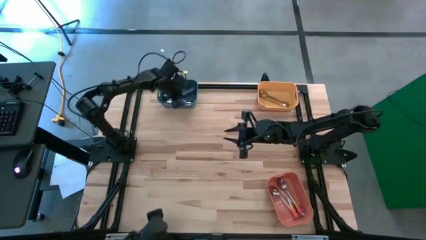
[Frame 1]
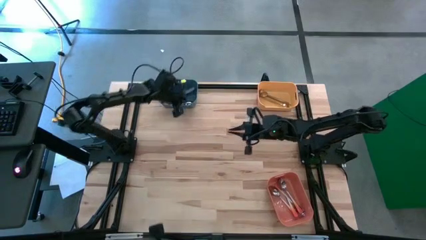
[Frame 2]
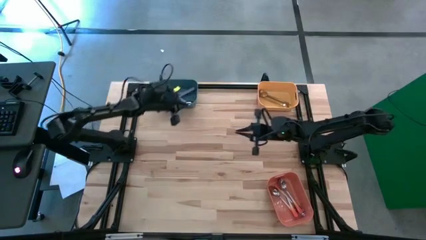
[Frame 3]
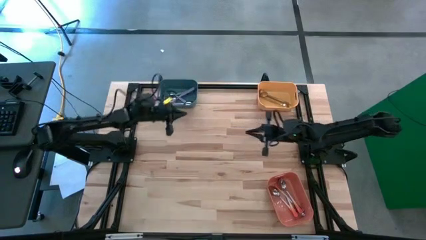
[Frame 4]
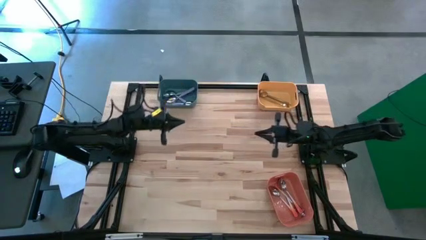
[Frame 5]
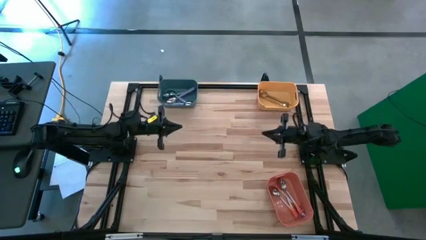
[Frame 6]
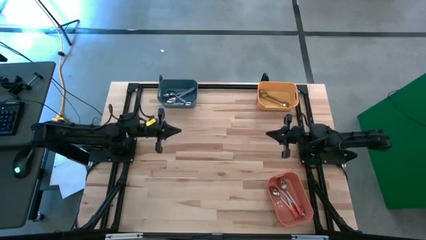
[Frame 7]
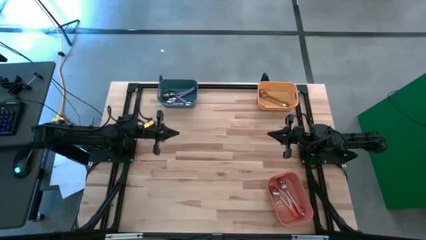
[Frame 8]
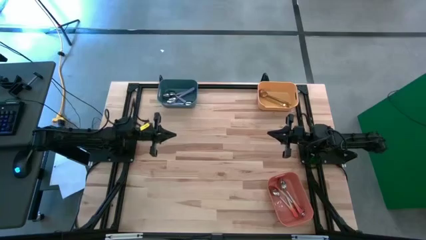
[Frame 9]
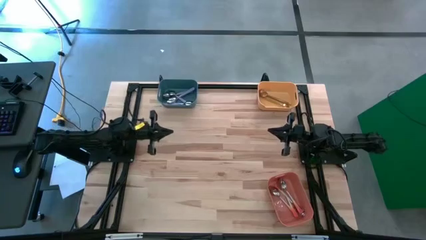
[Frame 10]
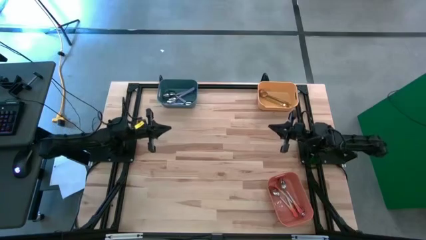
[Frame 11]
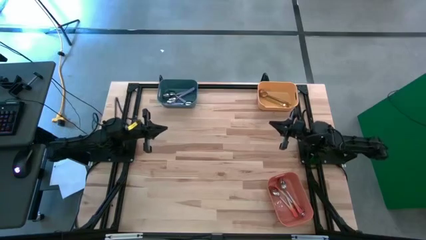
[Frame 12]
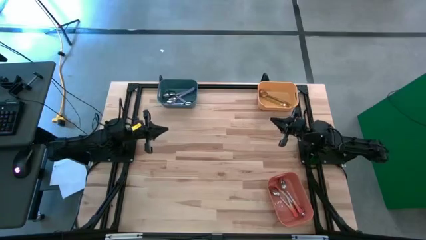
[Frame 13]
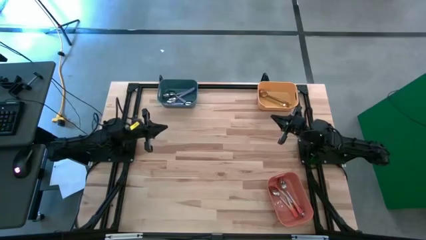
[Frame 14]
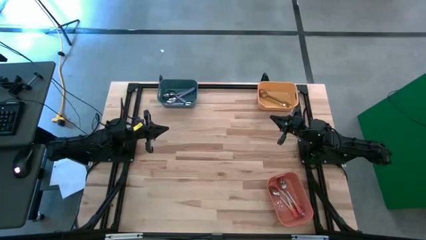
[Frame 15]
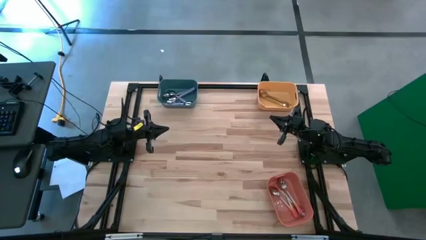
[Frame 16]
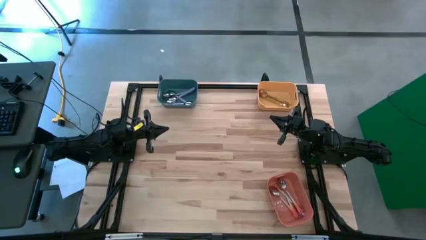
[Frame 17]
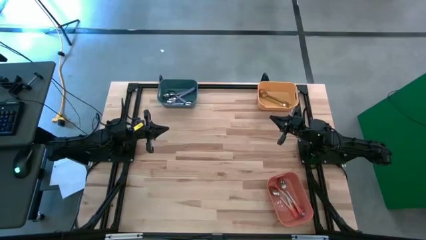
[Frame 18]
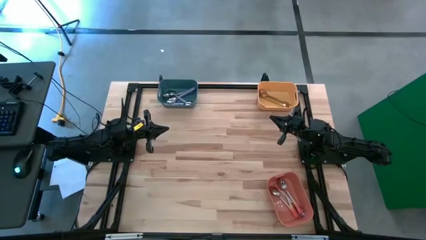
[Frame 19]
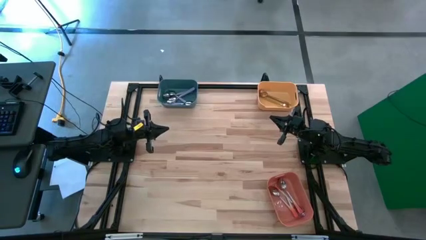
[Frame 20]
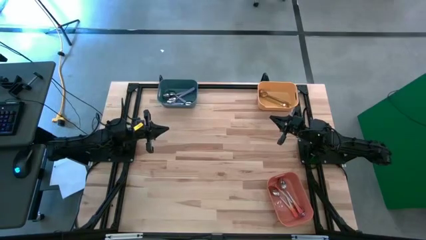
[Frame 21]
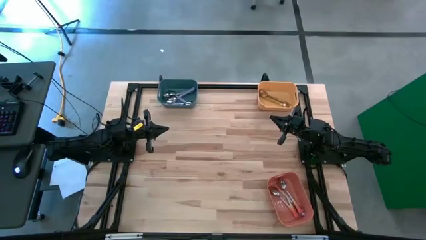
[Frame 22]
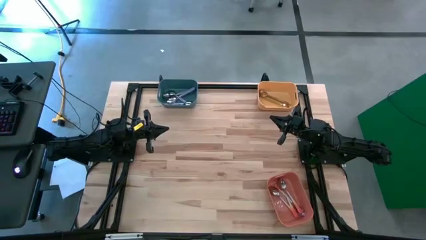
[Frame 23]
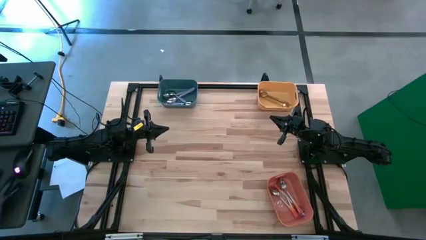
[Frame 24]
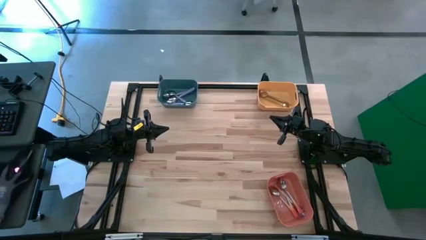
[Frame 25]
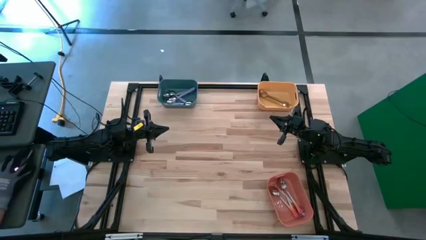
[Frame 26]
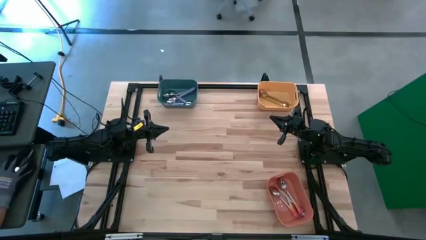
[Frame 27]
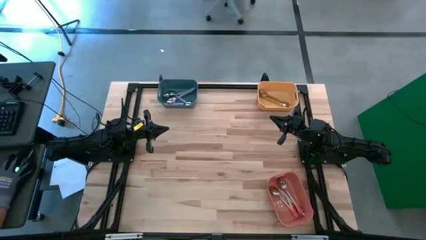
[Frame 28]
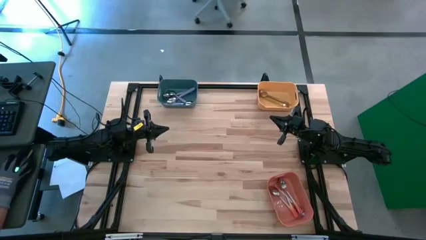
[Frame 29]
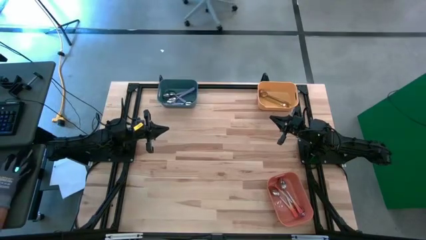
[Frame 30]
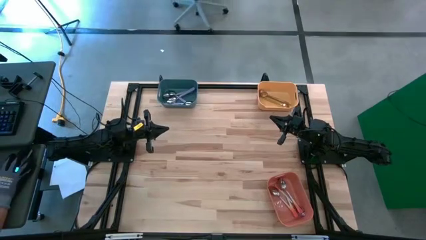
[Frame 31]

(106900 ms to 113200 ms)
Task: Sort silverware by color (type)
Return to Home Position

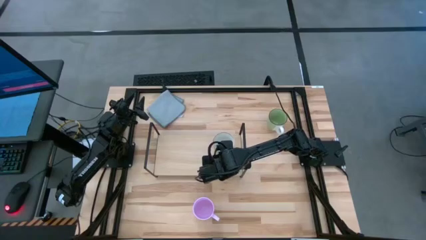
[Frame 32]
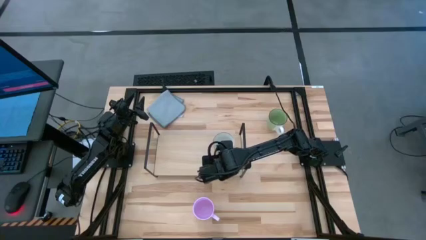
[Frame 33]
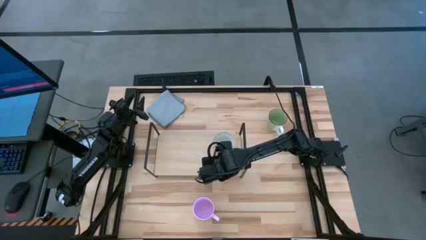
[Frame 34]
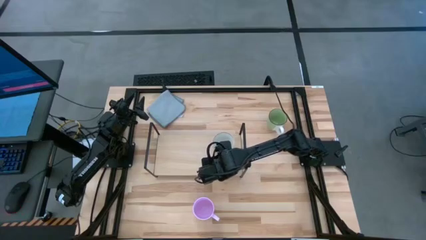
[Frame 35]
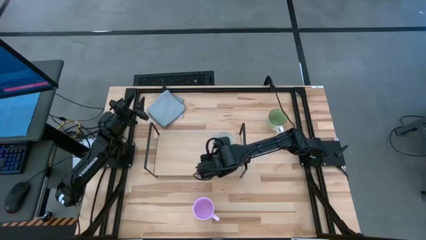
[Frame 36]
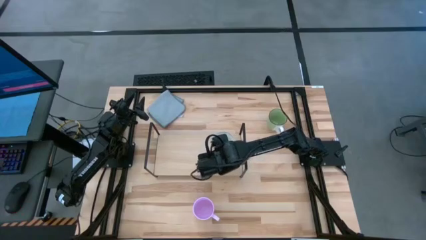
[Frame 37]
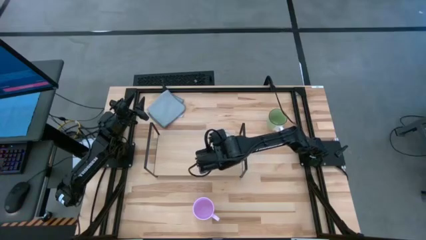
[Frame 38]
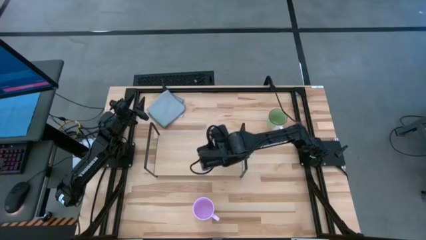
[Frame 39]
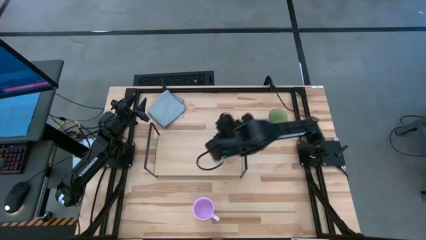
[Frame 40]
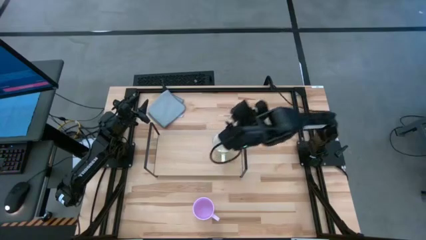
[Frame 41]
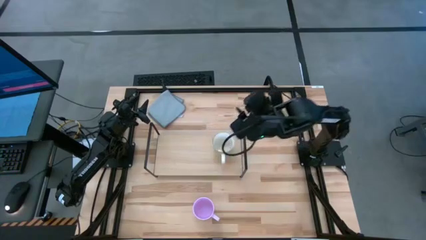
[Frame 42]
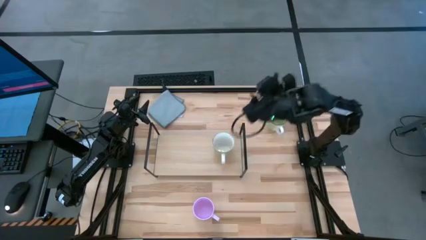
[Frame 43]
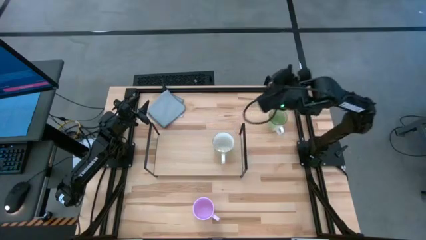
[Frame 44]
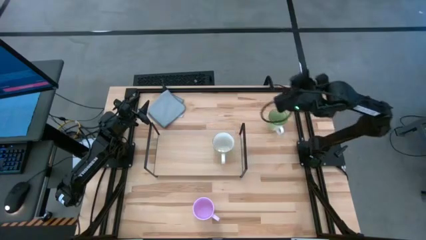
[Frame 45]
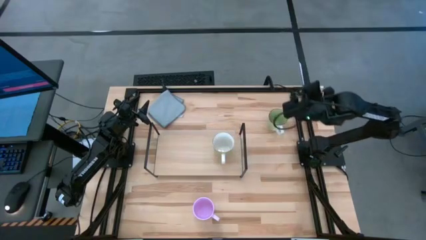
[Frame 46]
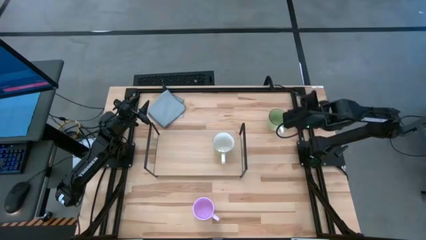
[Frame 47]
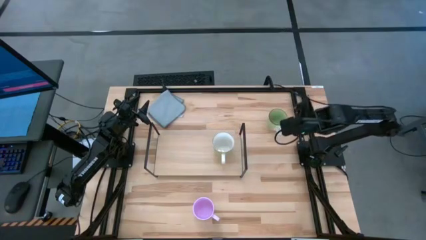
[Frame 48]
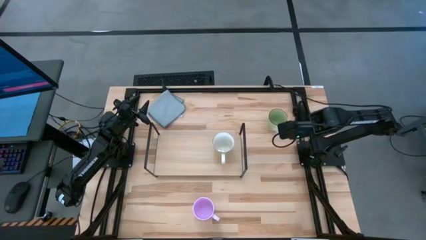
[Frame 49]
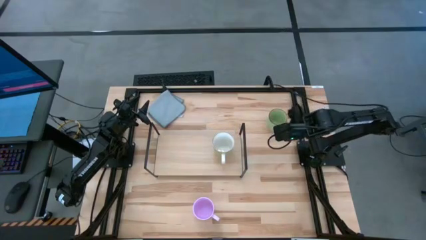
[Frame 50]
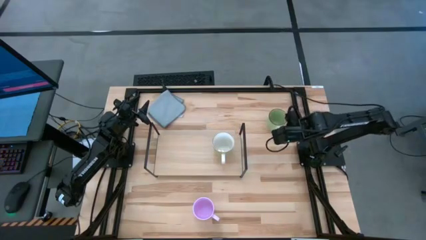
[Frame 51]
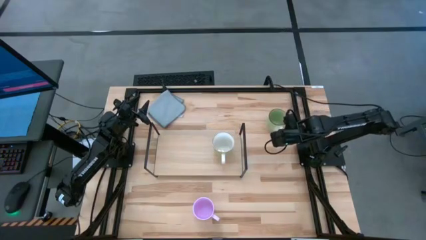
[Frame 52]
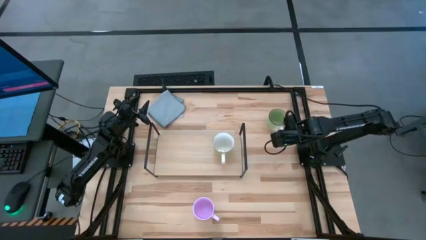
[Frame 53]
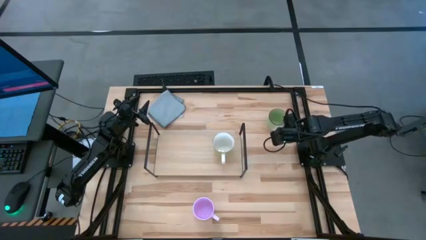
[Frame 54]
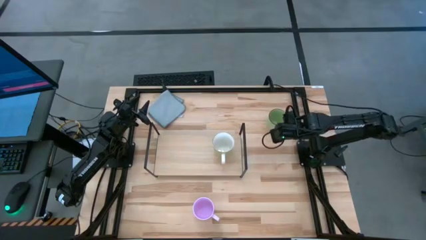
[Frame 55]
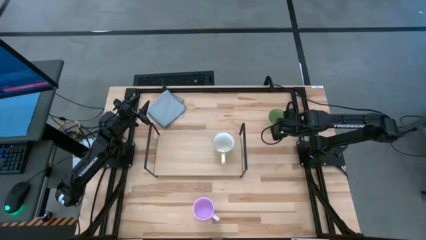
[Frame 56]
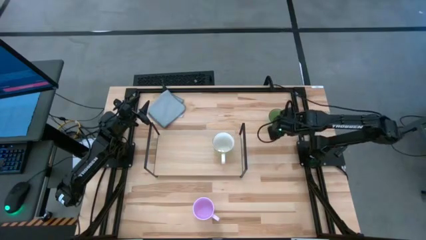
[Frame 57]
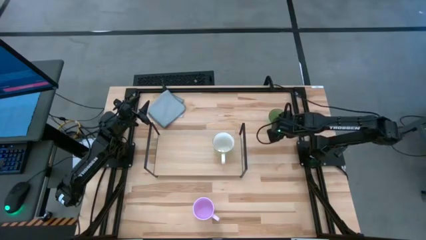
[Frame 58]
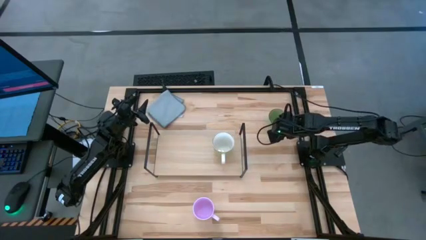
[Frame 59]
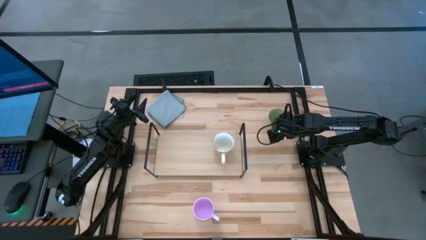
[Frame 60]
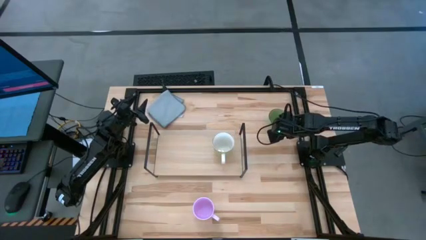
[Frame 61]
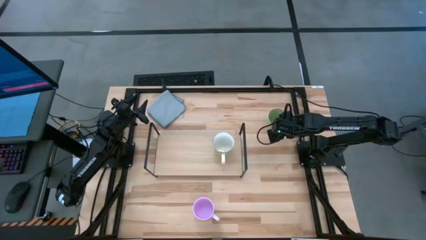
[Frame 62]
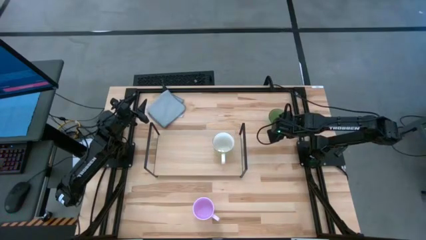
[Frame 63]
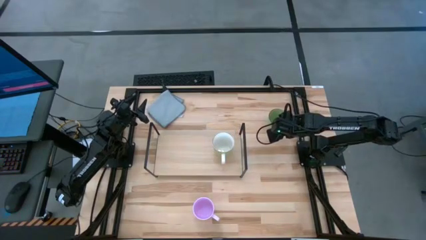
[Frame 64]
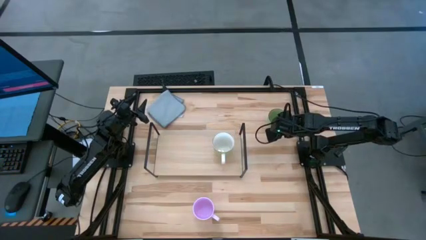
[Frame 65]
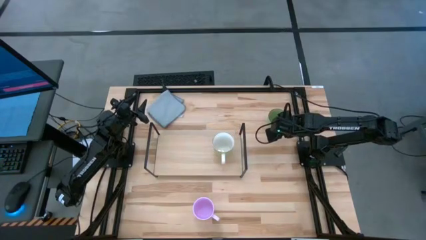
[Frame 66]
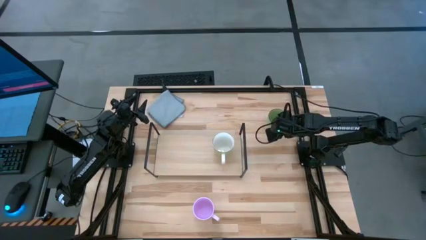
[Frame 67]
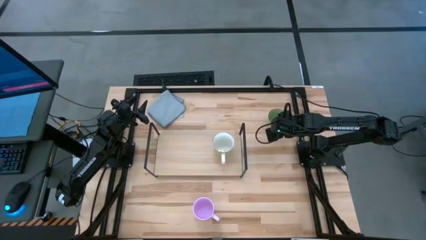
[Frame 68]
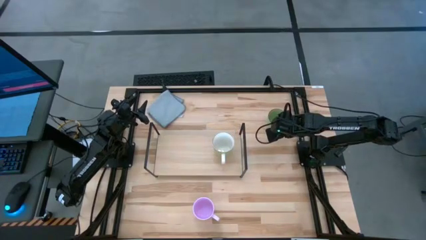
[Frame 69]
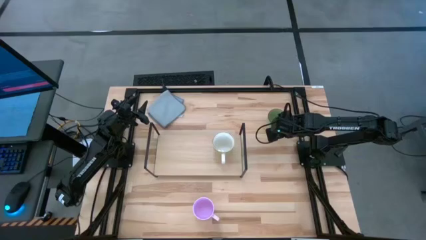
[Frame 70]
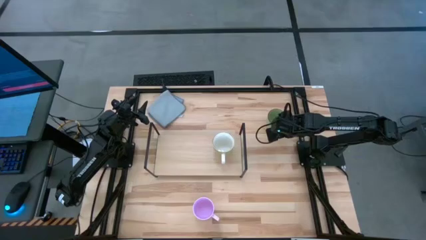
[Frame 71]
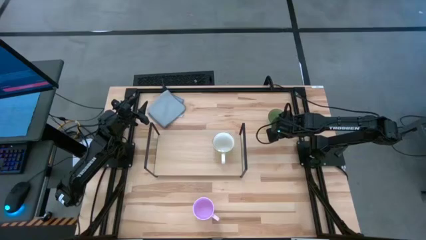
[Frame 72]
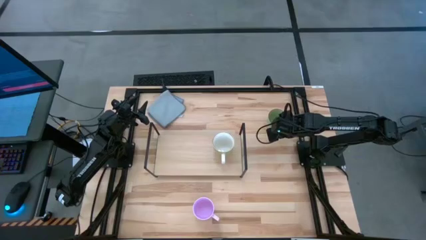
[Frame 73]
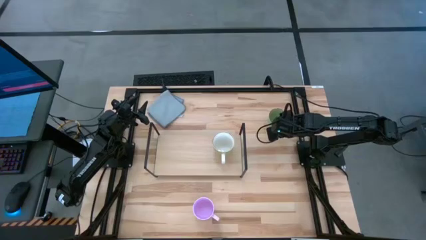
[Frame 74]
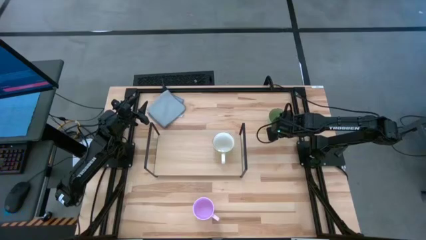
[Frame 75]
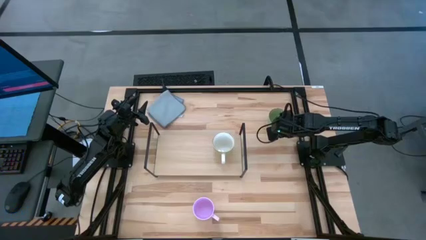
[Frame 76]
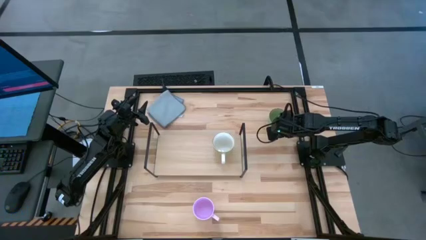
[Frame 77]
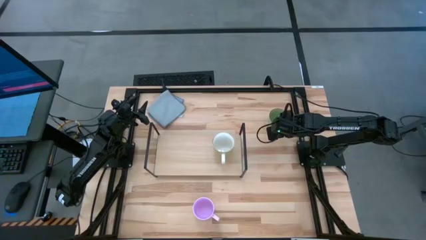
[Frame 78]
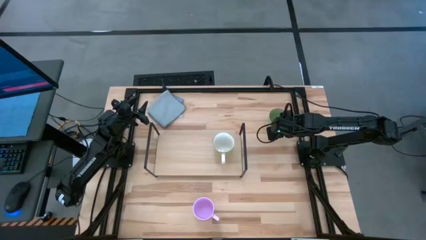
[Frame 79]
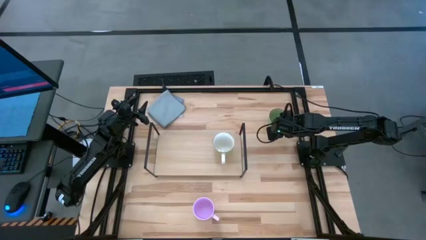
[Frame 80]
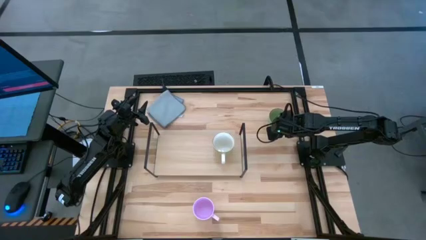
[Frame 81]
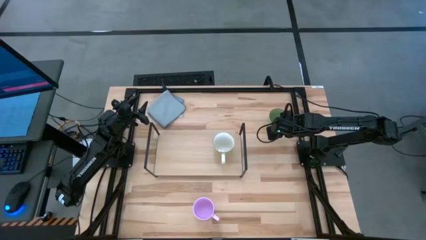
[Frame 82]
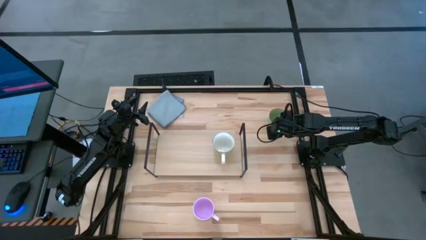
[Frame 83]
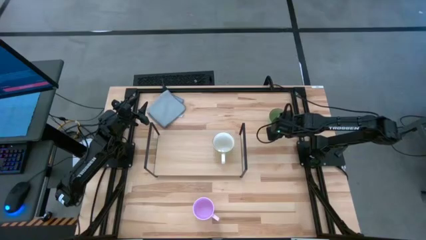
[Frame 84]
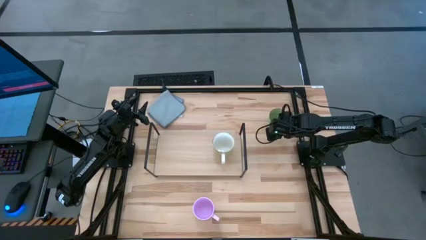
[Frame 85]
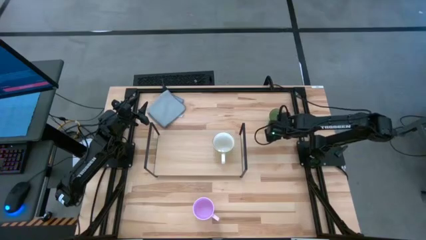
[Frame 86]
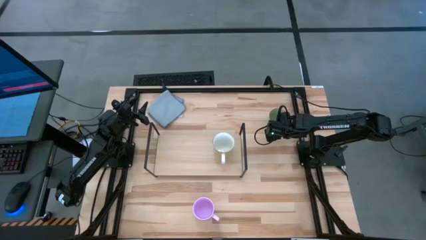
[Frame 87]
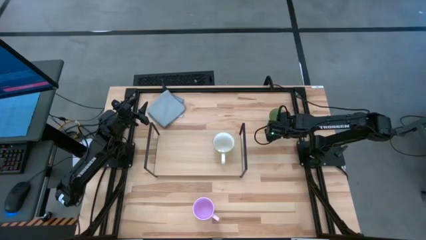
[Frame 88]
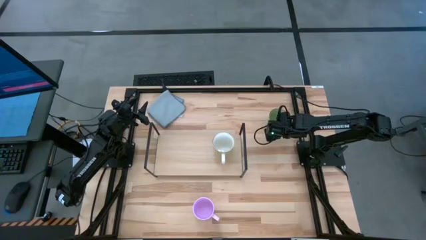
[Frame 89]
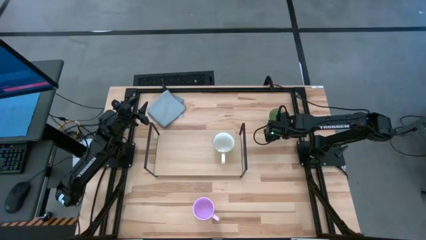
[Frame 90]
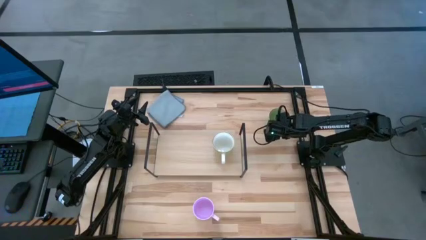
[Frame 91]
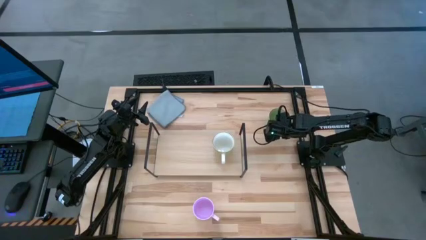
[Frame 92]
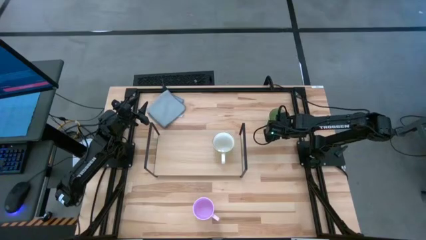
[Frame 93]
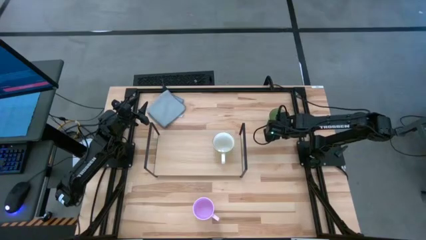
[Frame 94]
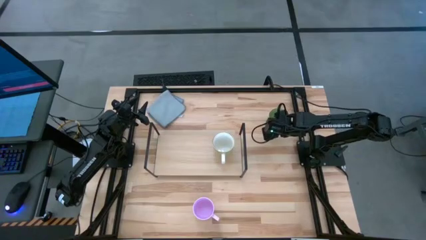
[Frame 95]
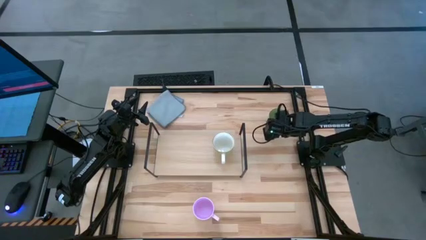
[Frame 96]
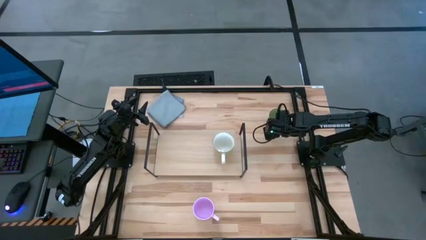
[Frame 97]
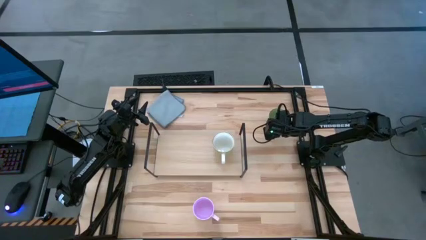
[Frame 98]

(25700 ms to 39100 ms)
Task: Stack small to large cups/mugs on shelf
Put the green mug on the shelf
